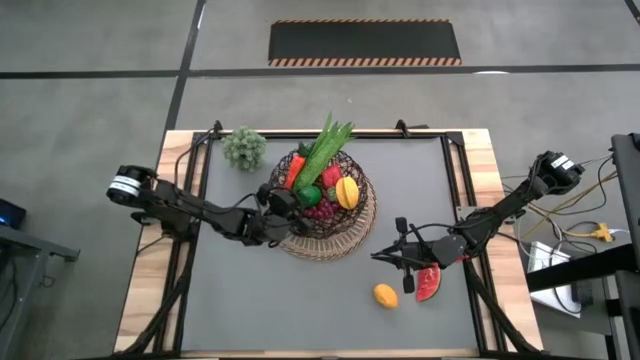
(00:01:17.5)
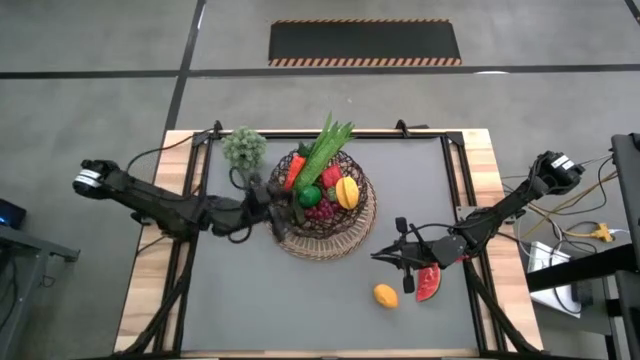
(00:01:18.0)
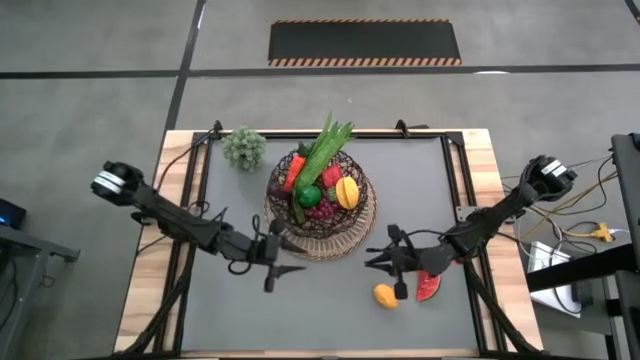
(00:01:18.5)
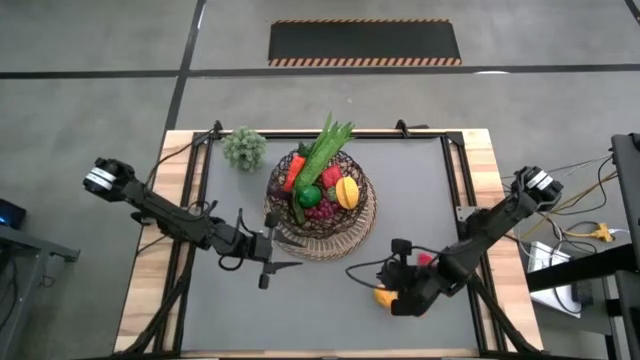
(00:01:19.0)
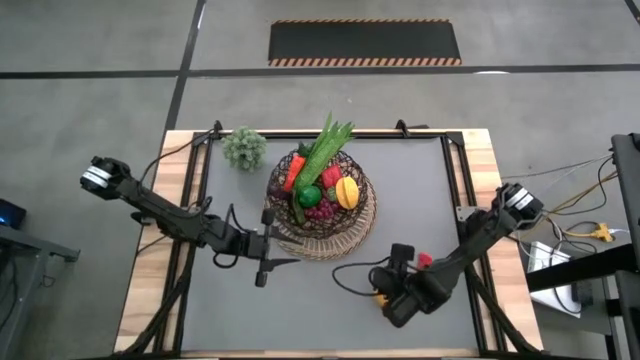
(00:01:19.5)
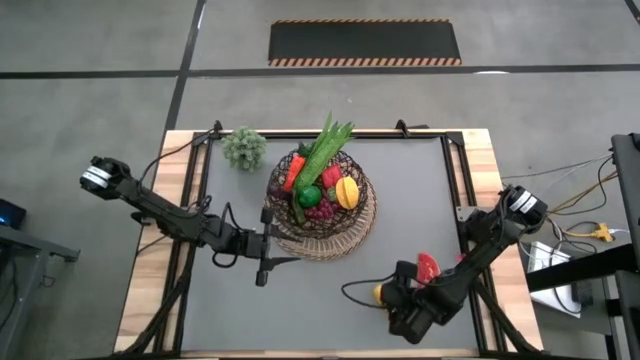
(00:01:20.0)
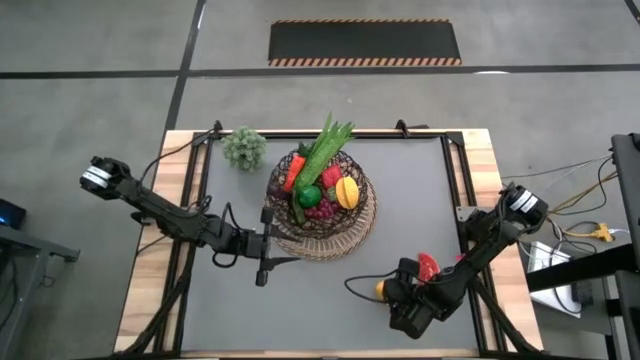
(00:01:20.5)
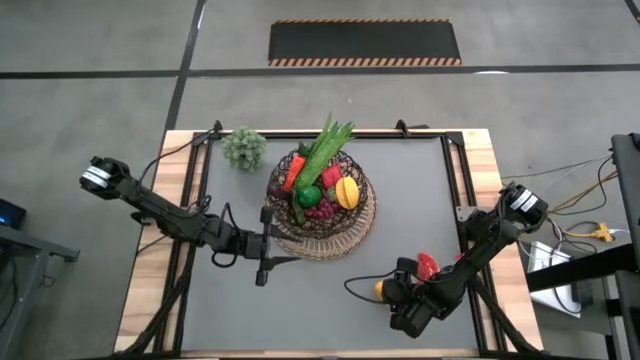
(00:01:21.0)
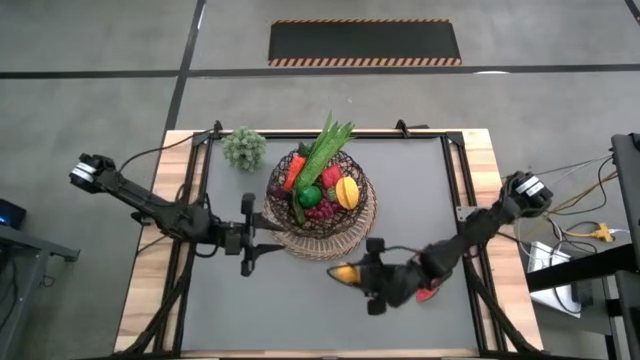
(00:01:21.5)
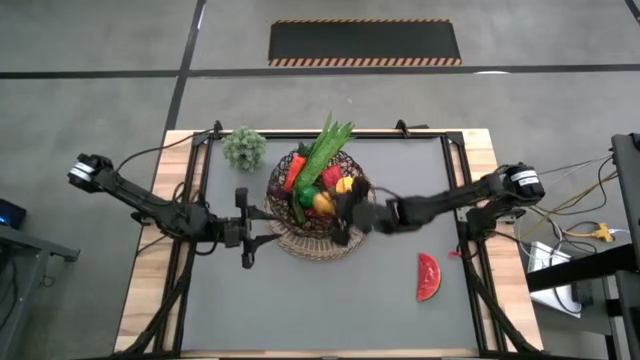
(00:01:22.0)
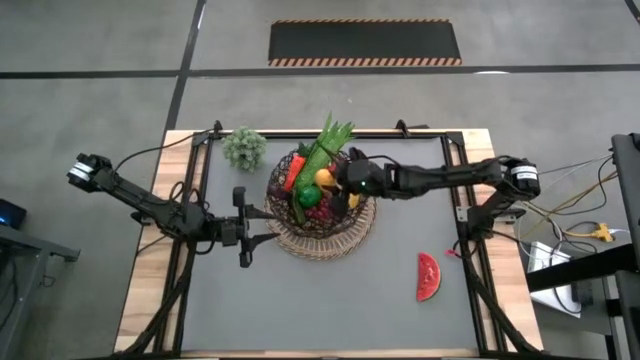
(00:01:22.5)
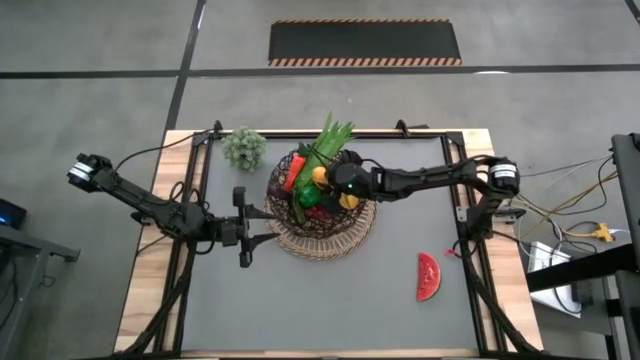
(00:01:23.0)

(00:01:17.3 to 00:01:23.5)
Task: Build produce basket
Put the yellow lemon into the basket

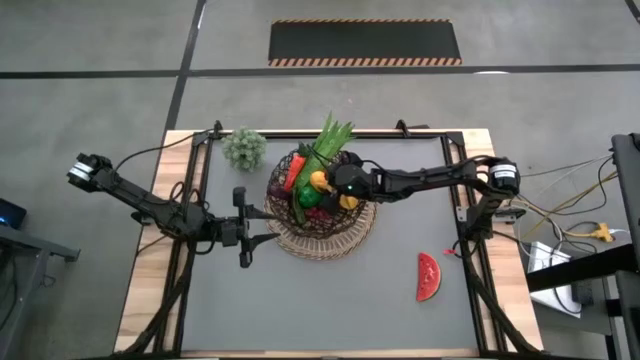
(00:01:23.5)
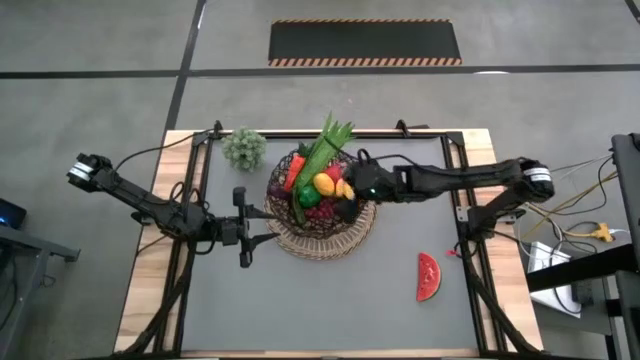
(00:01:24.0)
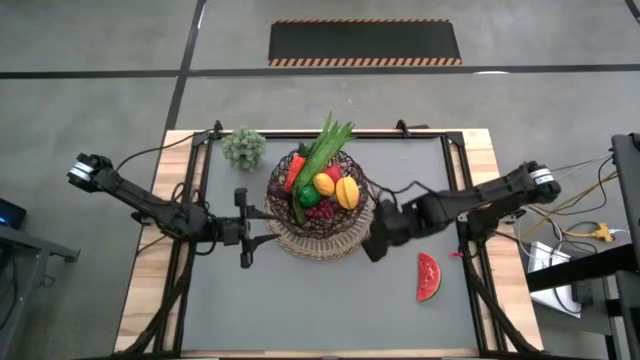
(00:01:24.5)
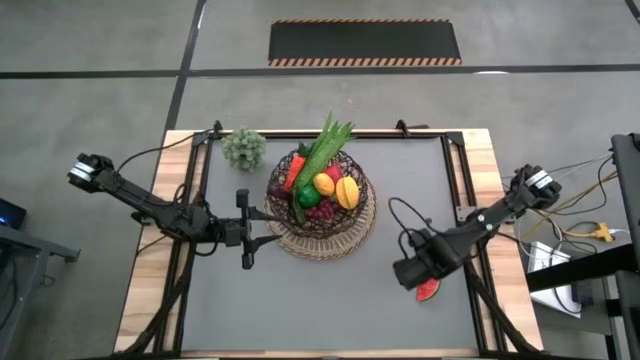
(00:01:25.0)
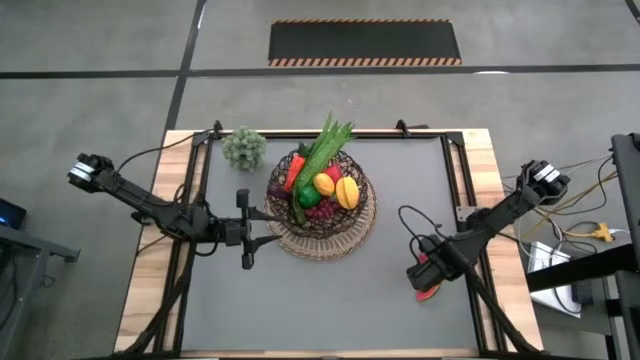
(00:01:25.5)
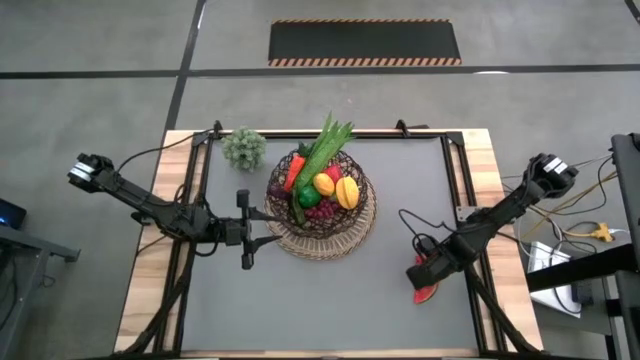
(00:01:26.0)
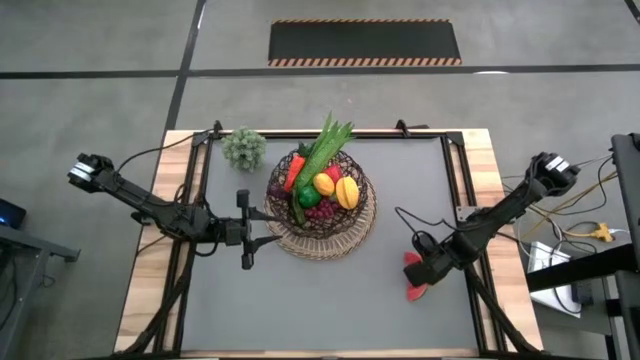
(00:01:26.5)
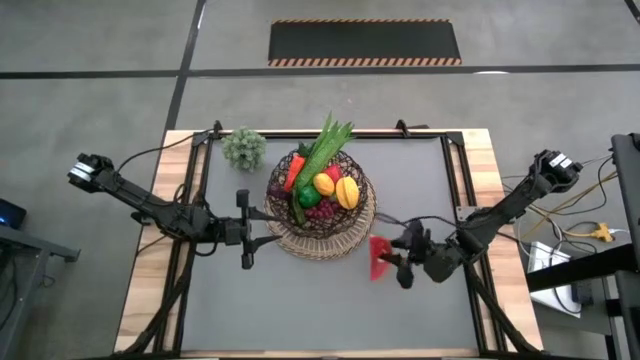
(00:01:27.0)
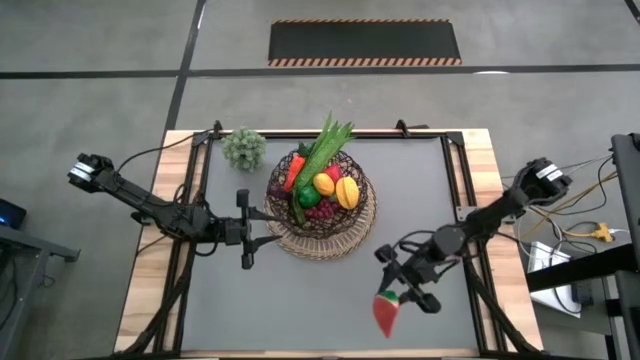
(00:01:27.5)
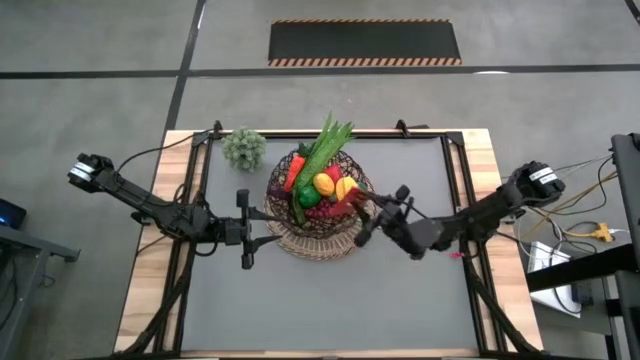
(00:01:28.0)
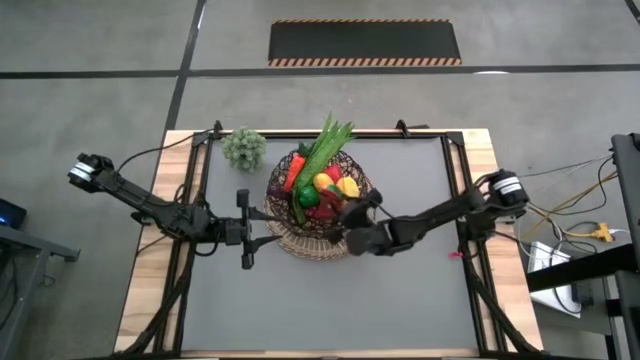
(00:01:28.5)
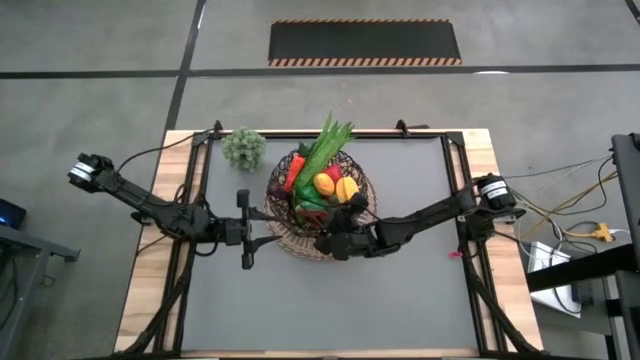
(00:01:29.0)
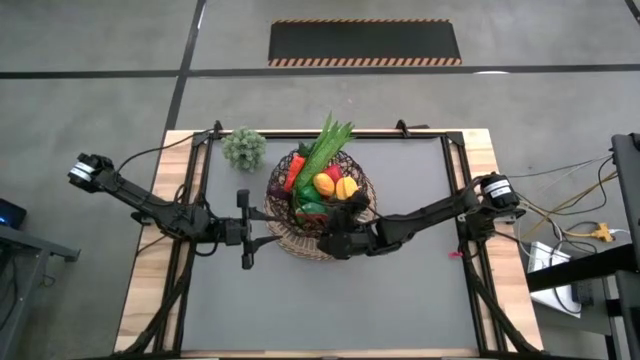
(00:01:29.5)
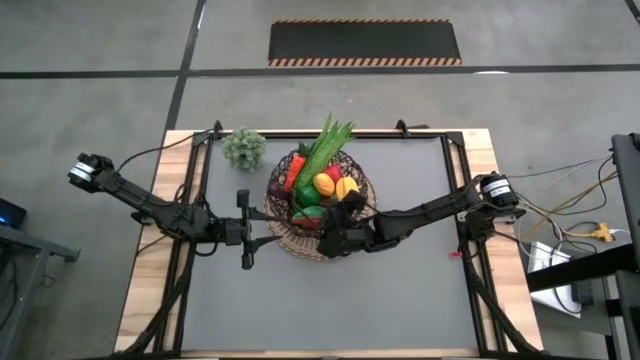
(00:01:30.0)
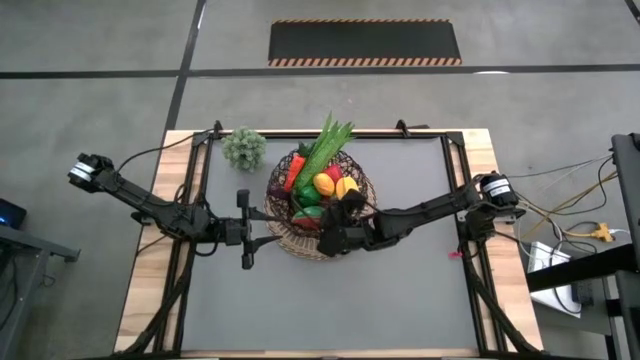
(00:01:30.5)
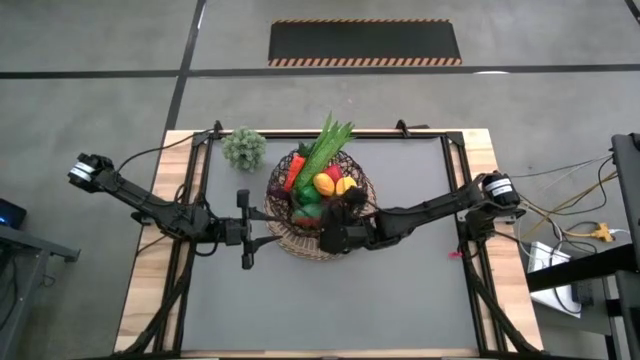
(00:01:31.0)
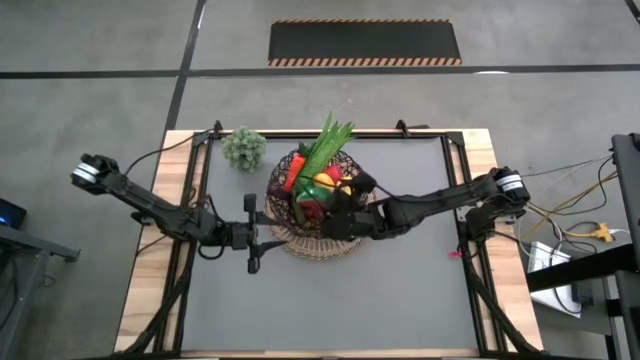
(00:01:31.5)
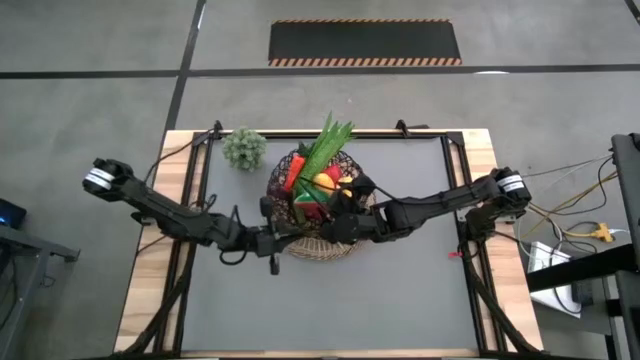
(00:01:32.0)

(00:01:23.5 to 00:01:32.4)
Put the red watermelon into the basket

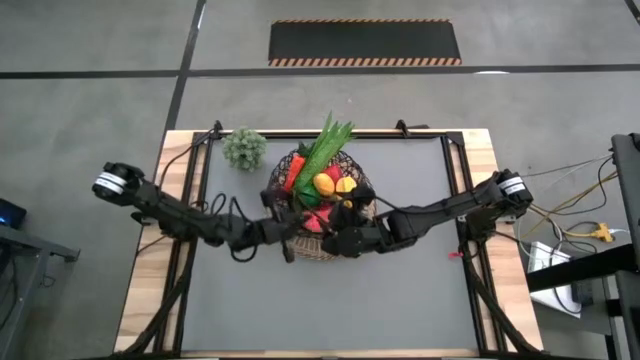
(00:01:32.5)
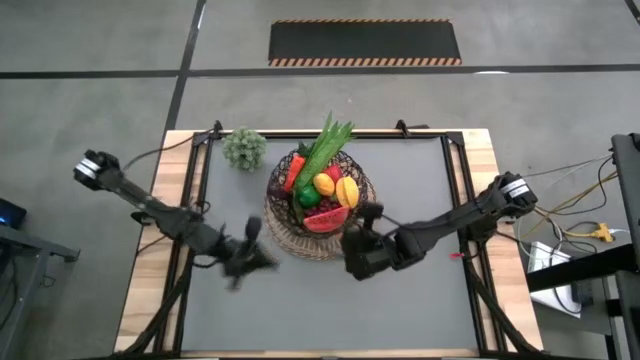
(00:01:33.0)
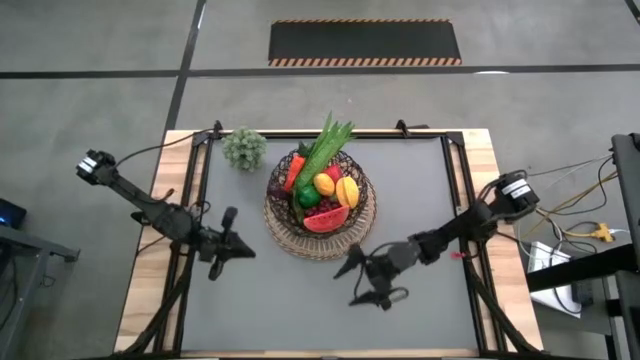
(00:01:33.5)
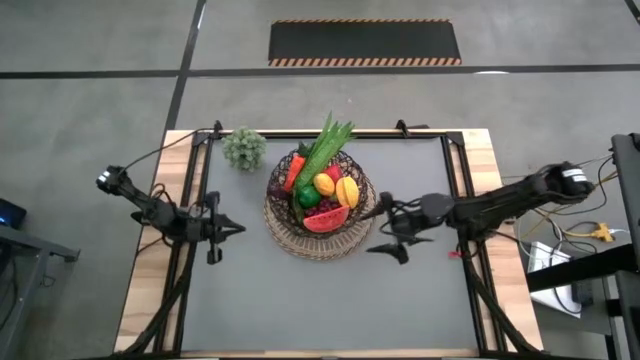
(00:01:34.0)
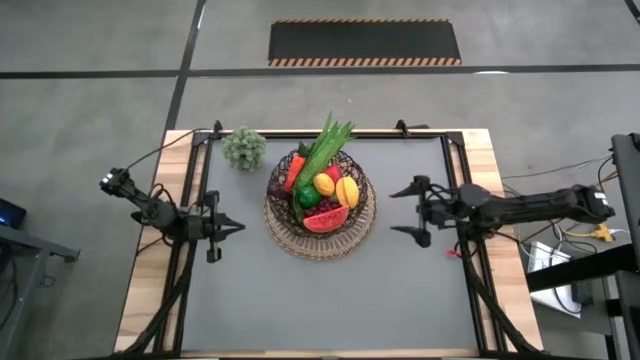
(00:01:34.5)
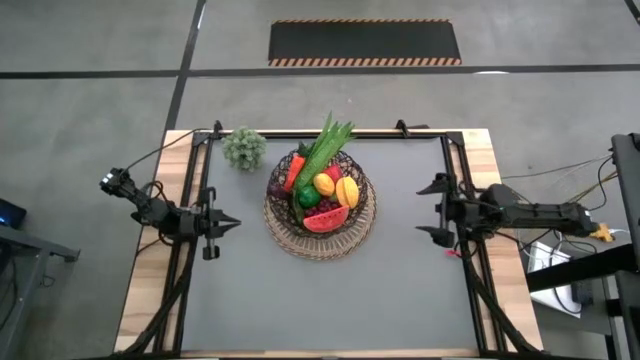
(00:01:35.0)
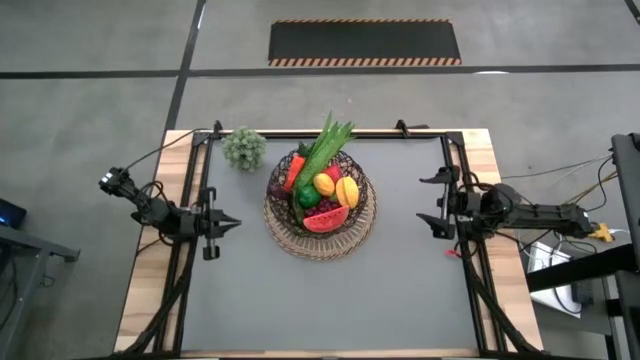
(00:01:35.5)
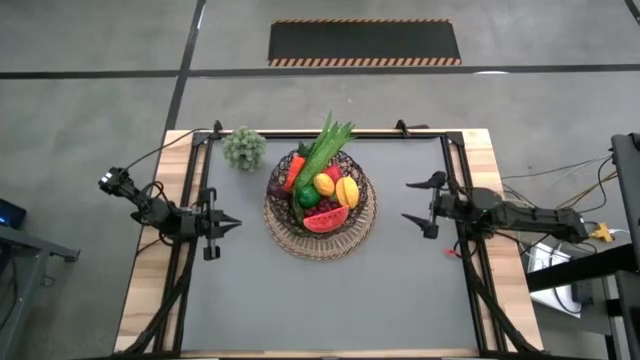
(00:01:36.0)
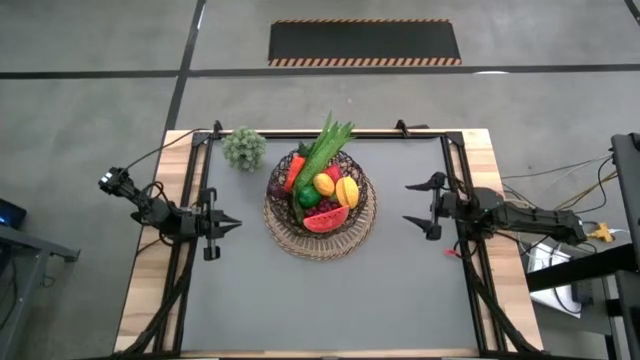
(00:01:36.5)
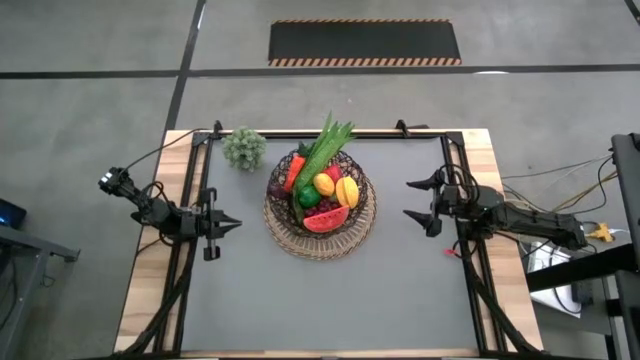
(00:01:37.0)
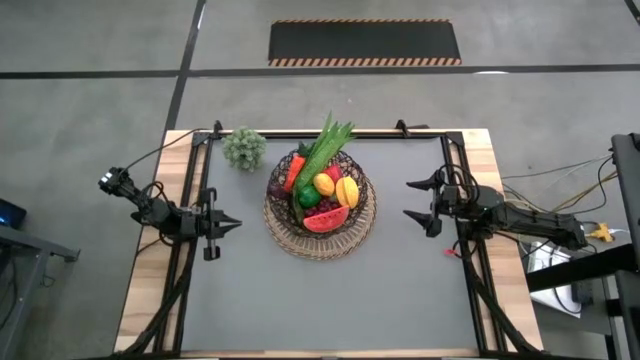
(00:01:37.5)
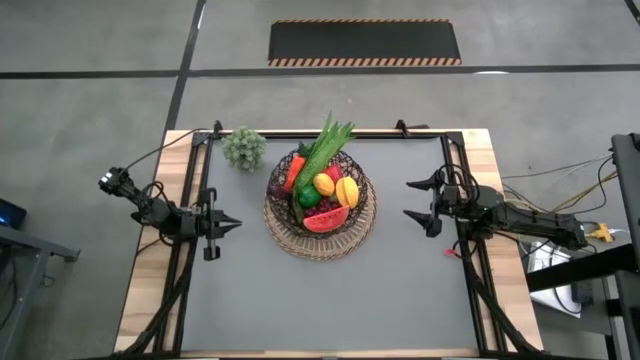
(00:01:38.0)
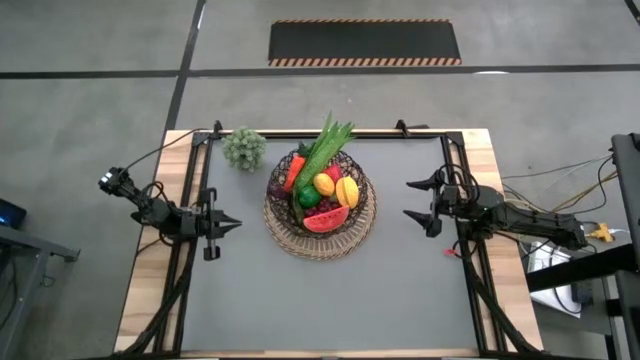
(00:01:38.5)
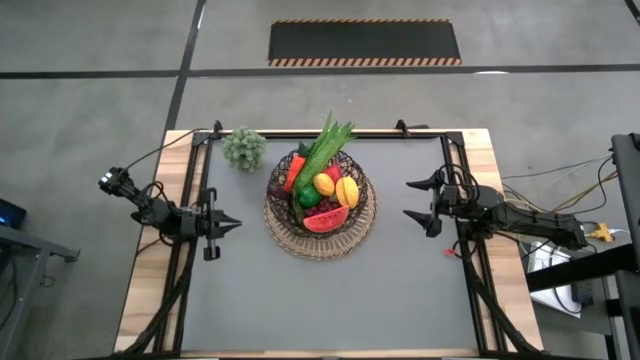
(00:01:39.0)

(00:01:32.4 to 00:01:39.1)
Return to Home Position
